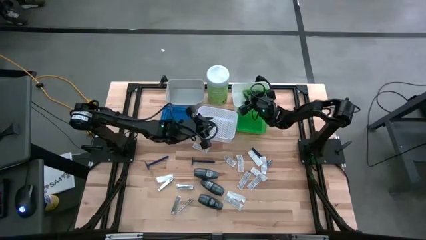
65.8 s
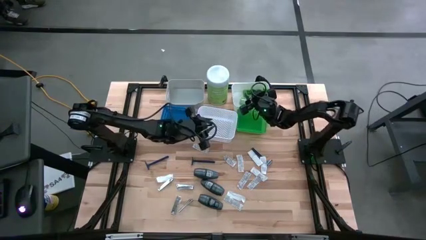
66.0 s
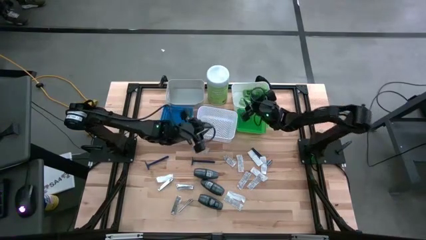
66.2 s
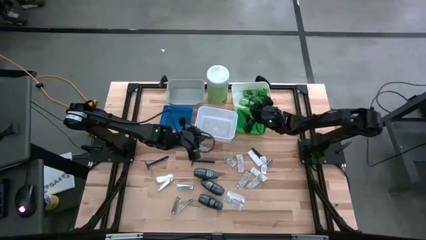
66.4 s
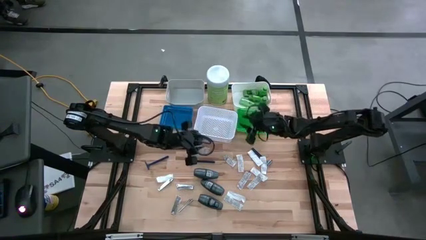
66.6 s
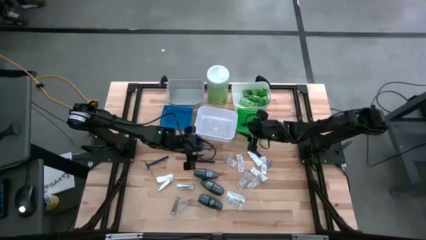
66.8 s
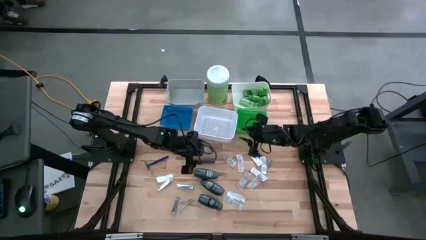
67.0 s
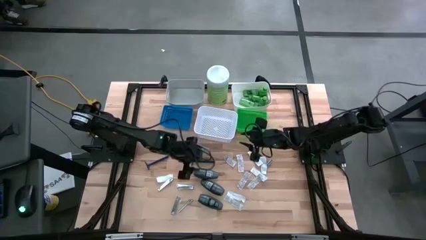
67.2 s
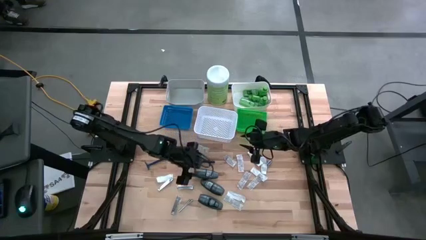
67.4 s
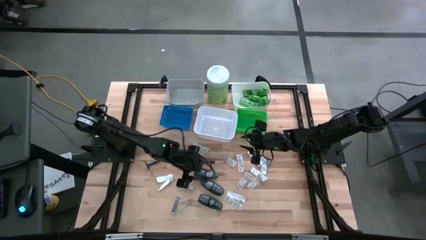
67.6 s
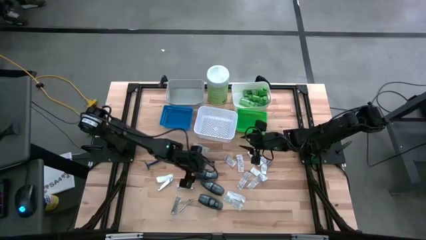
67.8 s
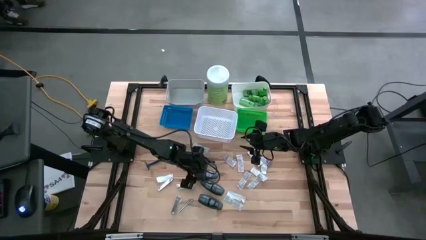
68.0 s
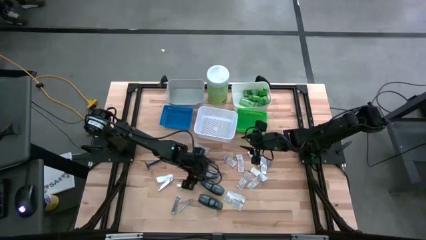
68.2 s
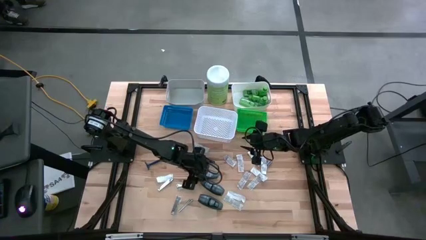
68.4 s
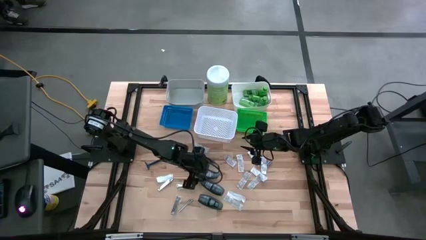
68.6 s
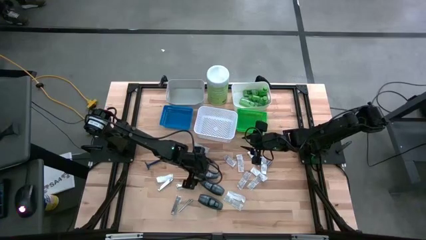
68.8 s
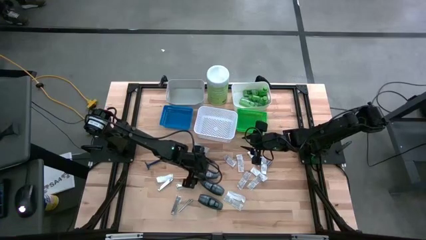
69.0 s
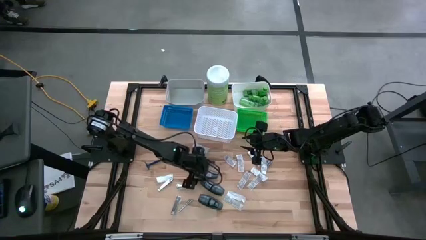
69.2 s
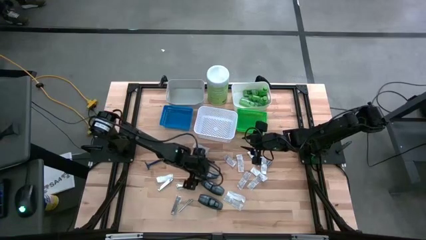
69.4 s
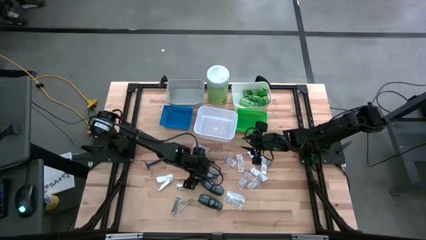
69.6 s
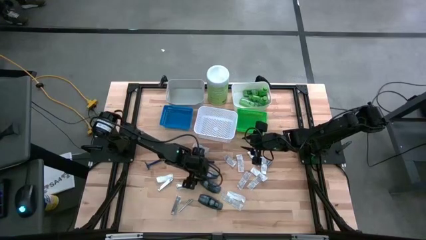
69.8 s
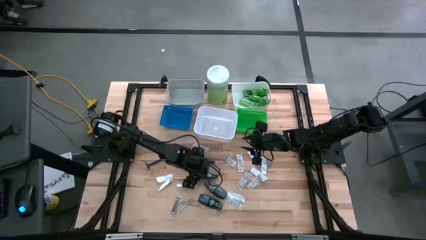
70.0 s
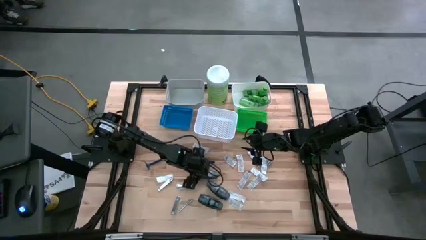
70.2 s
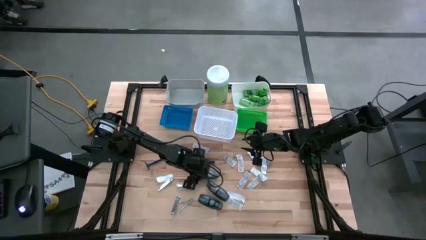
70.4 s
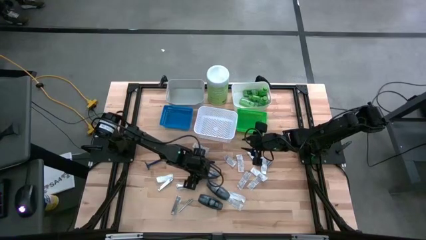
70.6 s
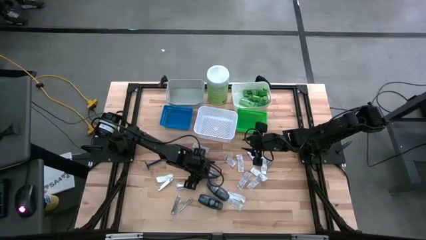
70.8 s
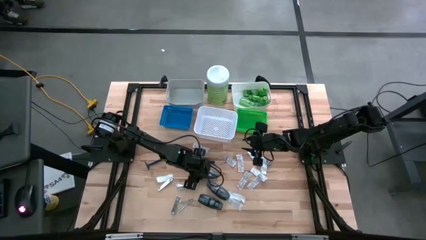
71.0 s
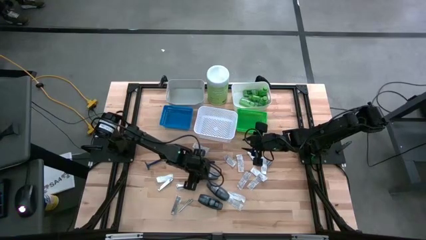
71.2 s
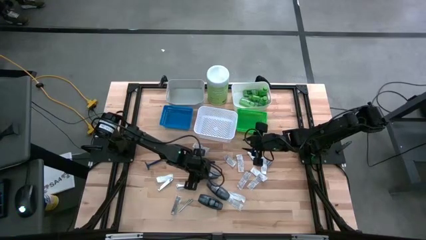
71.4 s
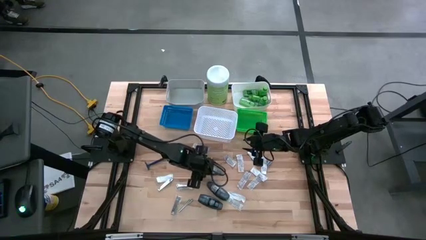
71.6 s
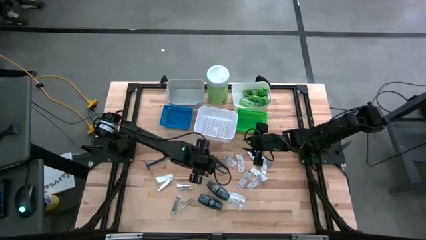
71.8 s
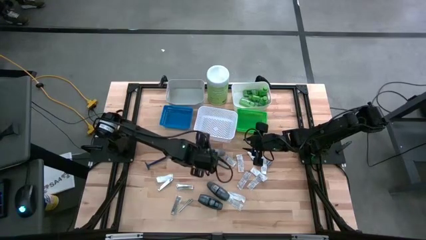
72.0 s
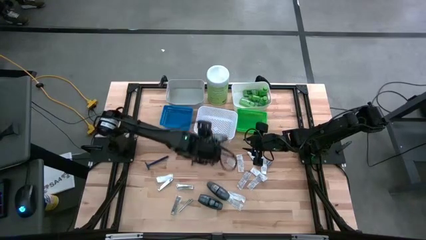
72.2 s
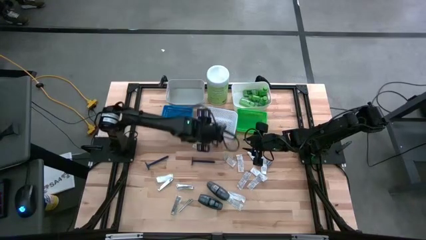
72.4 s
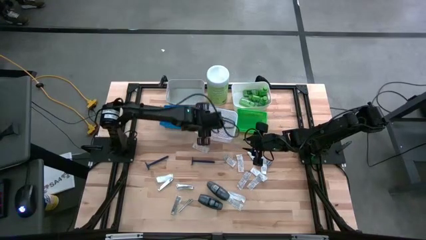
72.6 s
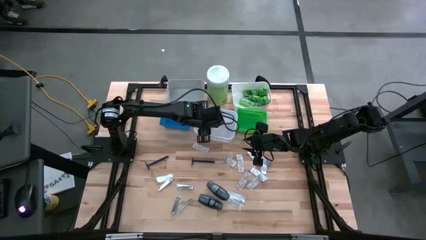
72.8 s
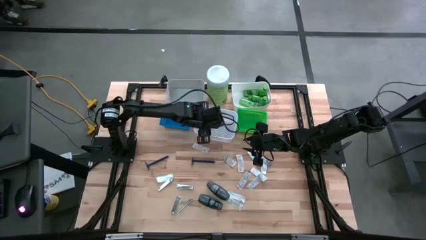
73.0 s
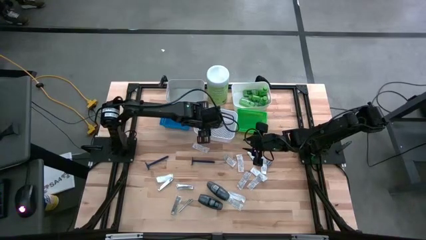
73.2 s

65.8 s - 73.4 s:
Task: Pick & Place Travel size toiletries
Put the black deodorant into the large white bin

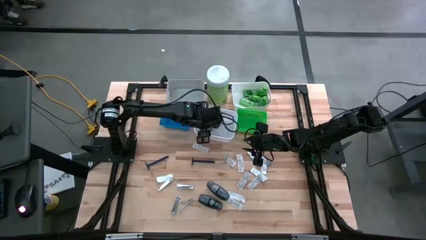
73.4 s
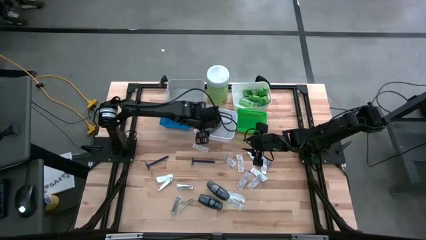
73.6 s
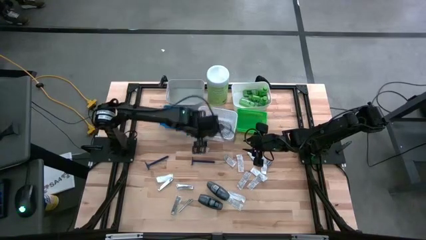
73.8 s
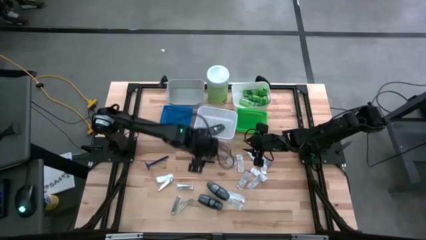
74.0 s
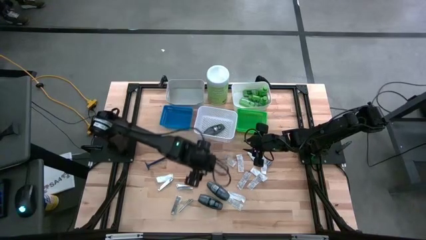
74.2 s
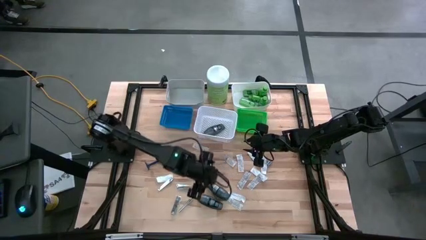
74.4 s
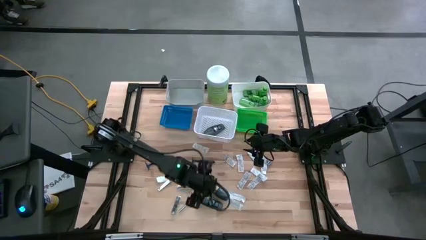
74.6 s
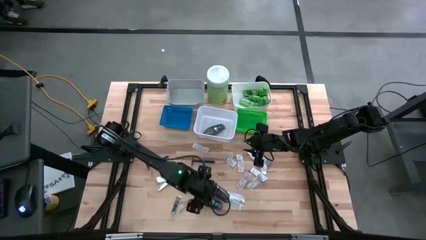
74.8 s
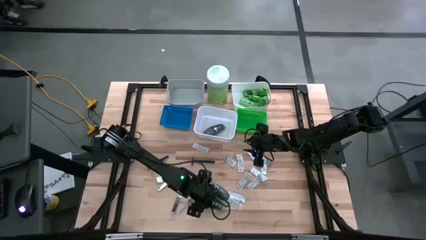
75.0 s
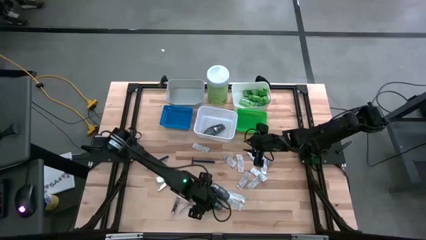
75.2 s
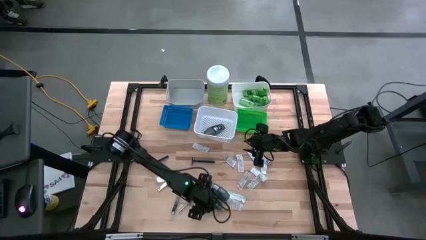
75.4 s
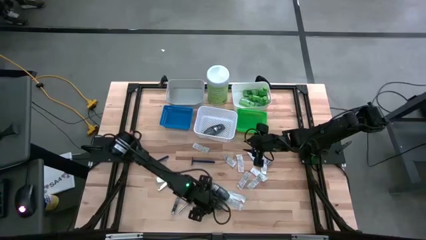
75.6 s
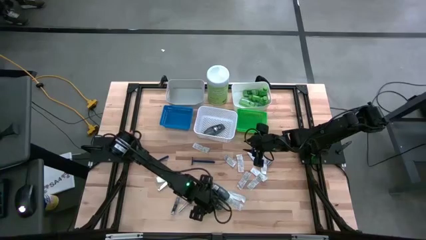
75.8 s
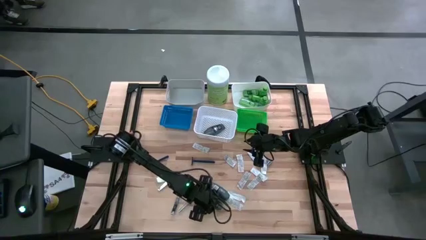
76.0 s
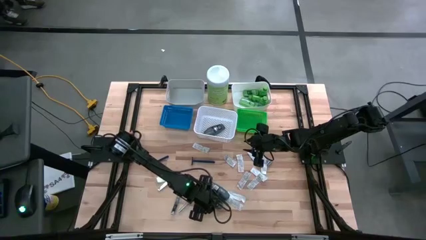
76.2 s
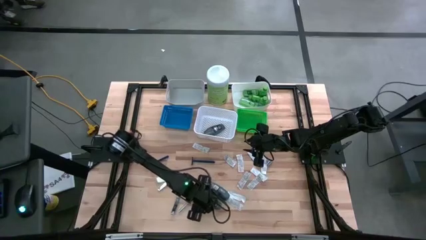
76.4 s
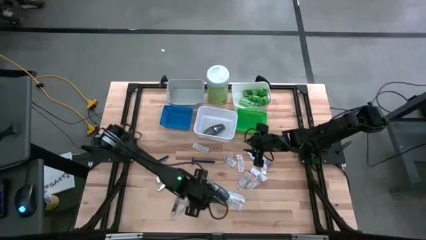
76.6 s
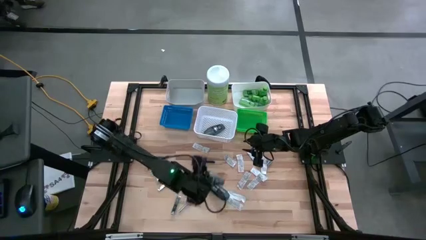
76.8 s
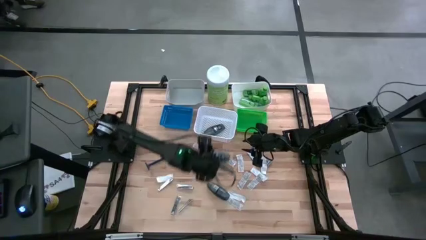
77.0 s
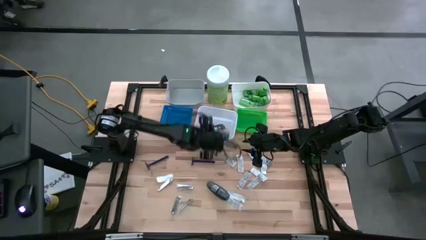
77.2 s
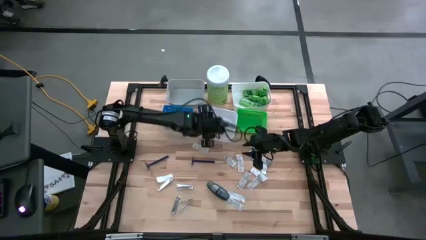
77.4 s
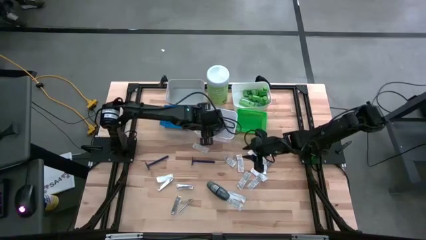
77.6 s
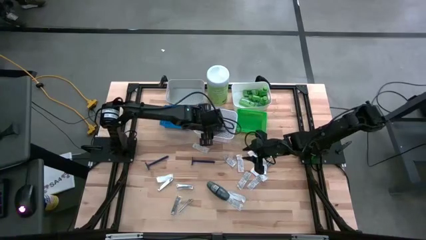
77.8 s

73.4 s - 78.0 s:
Put the black deodorant into the large white bin

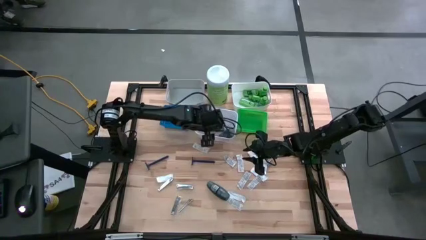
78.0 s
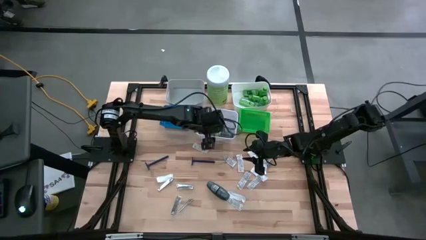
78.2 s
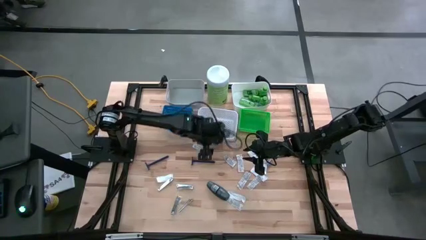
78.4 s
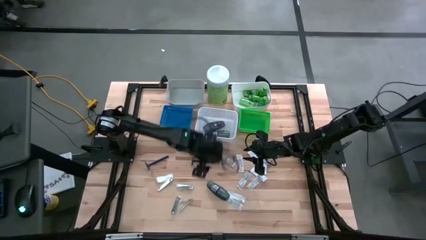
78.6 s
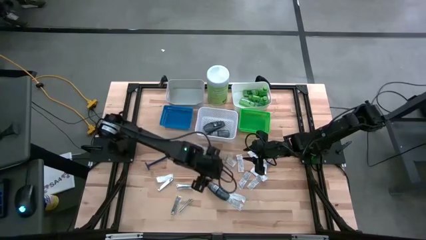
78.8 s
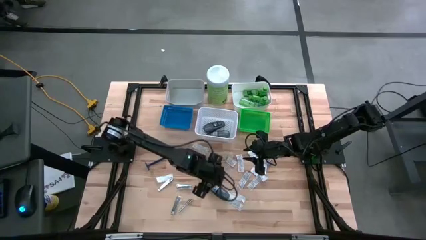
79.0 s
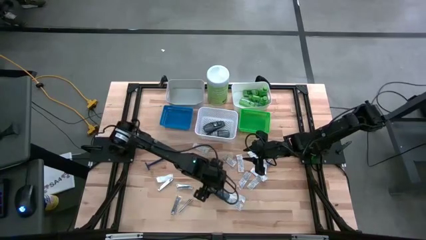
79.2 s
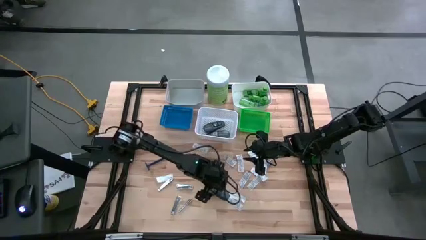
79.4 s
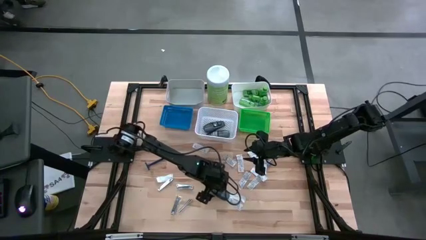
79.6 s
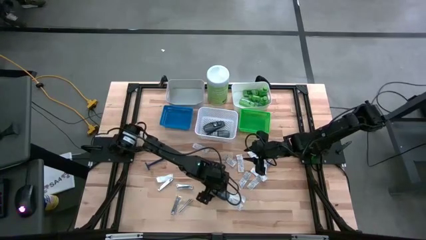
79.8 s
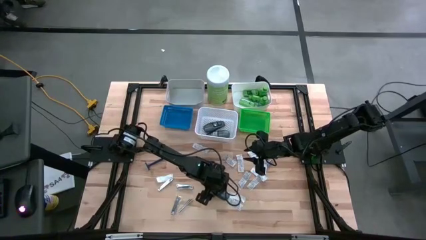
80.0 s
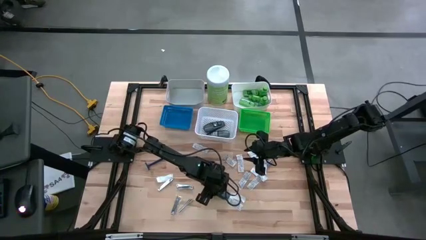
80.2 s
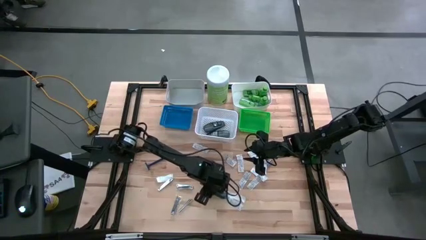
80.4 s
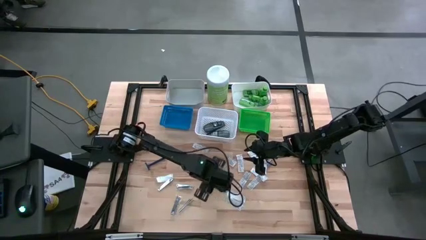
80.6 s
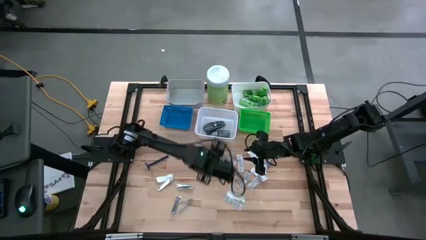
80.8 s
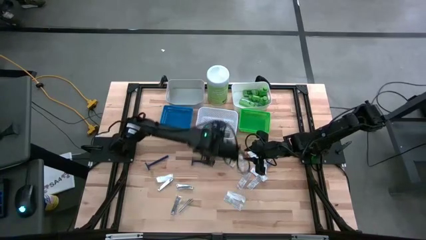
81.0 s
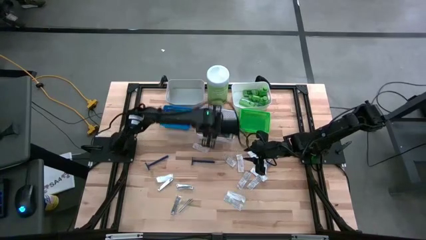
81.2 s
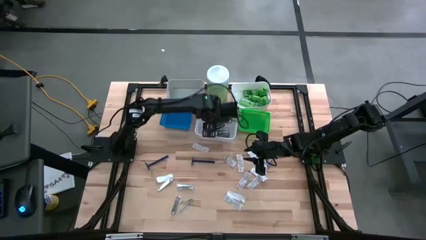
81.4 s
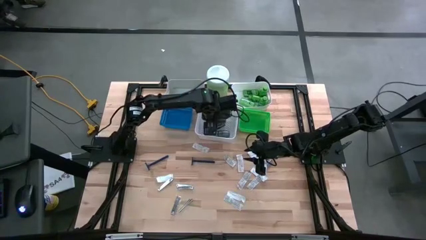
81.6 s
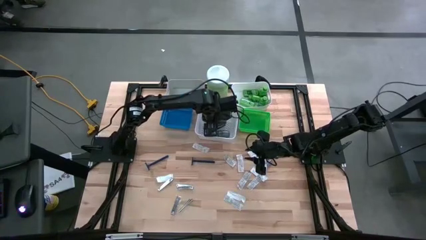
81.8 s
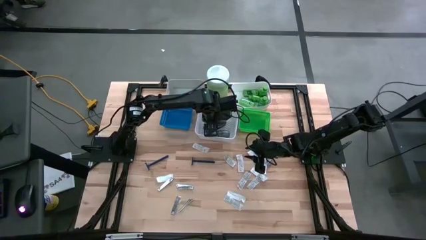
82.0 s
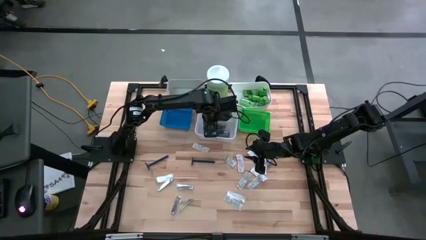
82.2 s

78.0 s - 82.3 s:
Put the black deodorant into the large white bin
